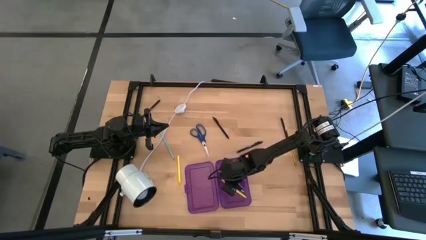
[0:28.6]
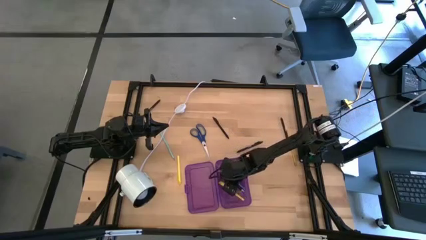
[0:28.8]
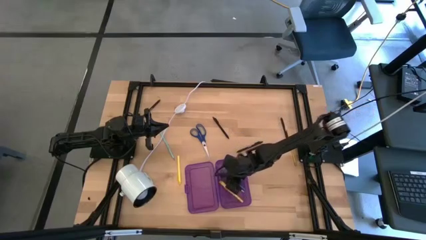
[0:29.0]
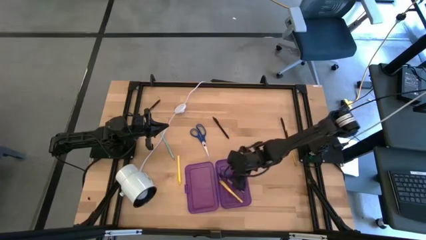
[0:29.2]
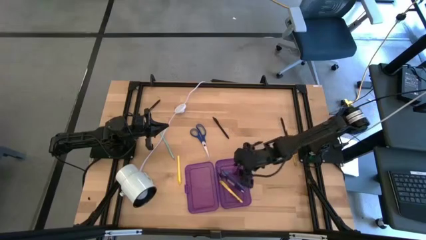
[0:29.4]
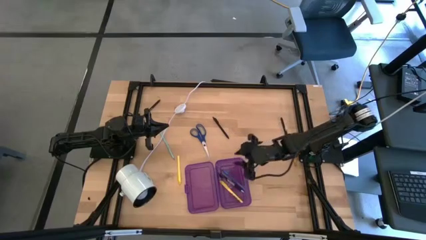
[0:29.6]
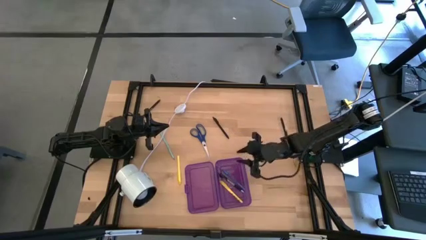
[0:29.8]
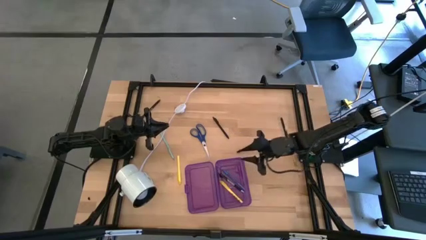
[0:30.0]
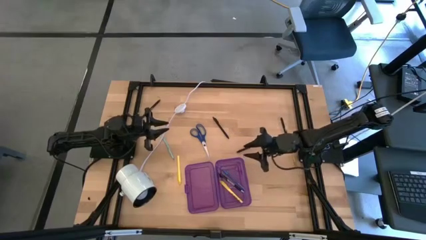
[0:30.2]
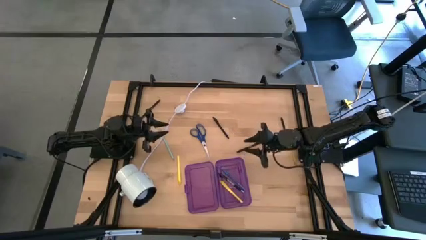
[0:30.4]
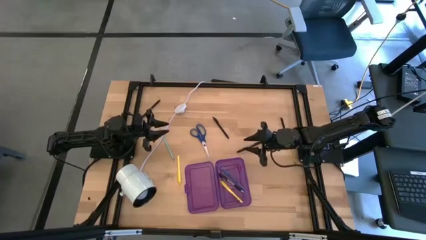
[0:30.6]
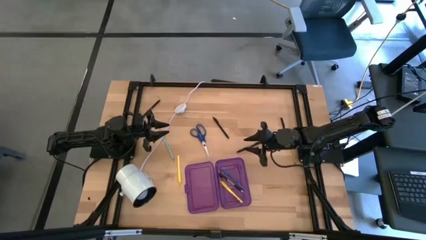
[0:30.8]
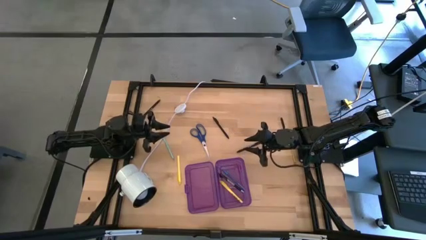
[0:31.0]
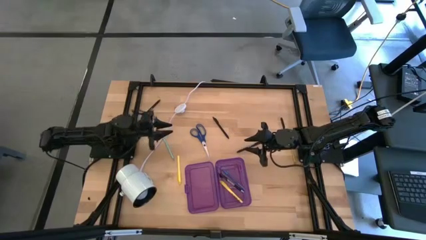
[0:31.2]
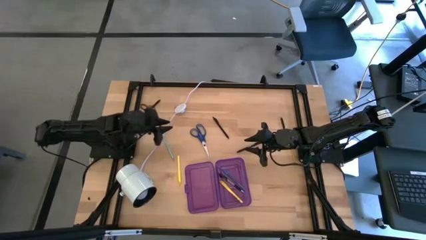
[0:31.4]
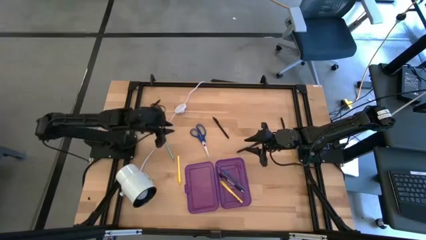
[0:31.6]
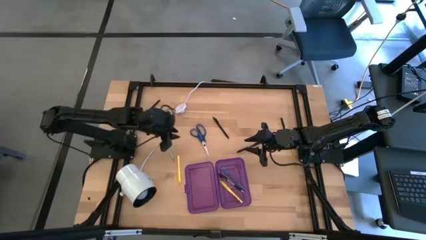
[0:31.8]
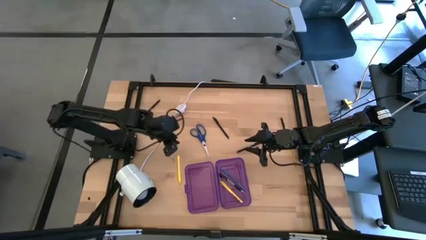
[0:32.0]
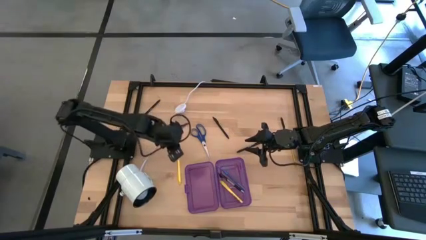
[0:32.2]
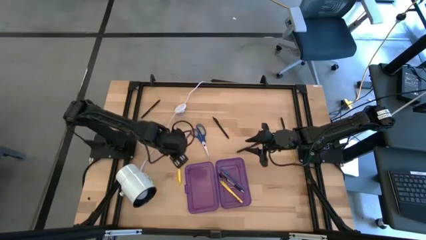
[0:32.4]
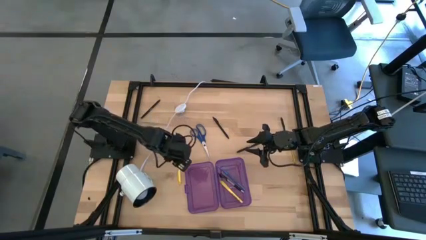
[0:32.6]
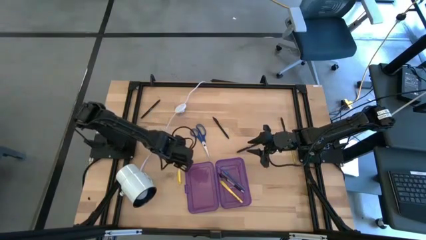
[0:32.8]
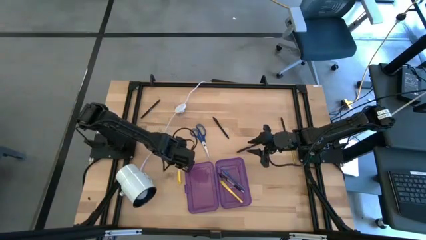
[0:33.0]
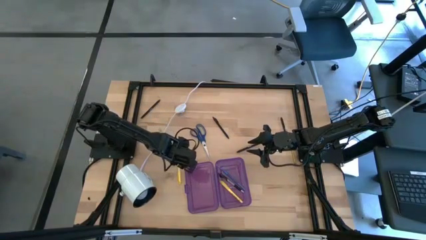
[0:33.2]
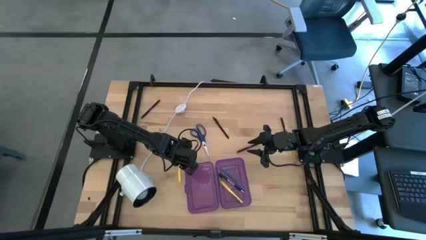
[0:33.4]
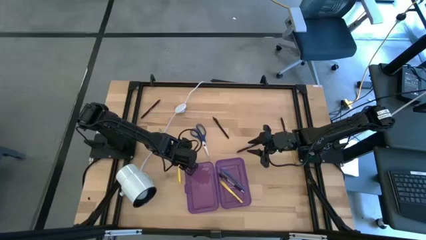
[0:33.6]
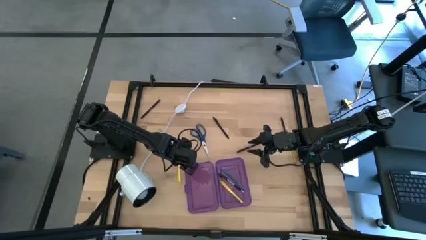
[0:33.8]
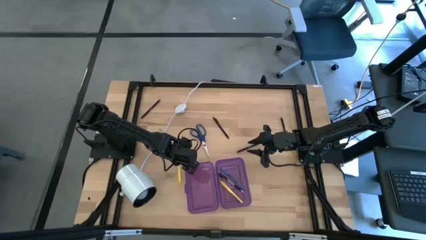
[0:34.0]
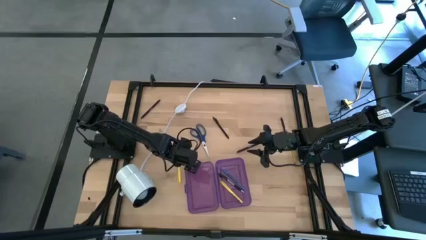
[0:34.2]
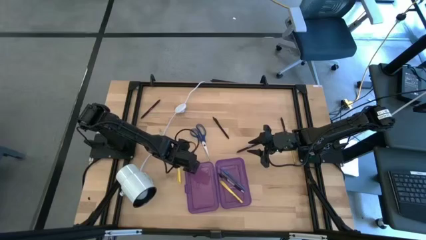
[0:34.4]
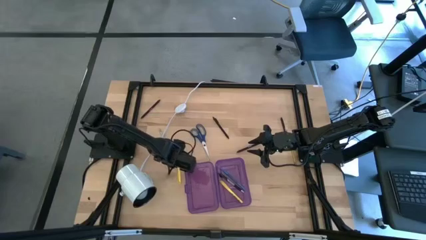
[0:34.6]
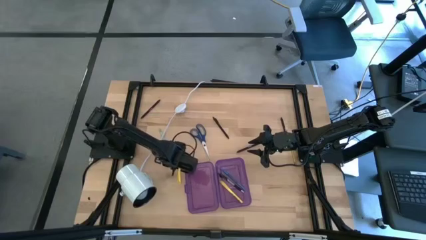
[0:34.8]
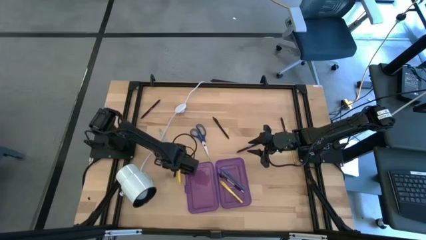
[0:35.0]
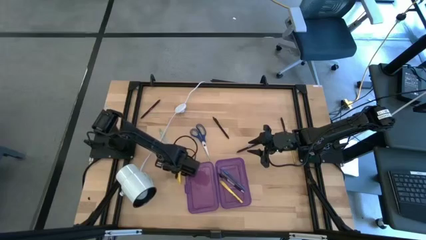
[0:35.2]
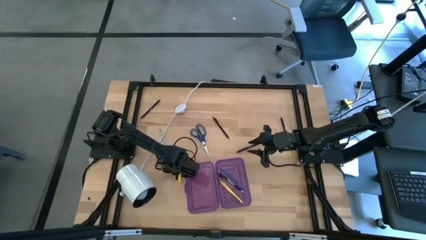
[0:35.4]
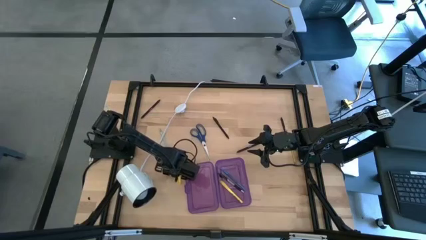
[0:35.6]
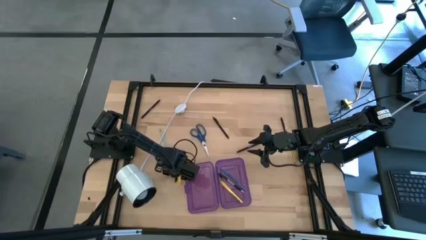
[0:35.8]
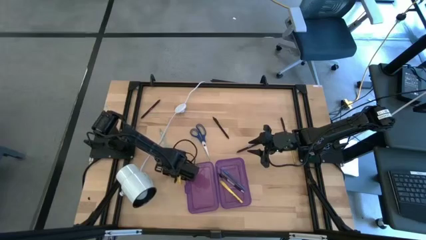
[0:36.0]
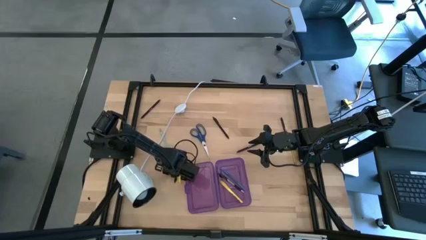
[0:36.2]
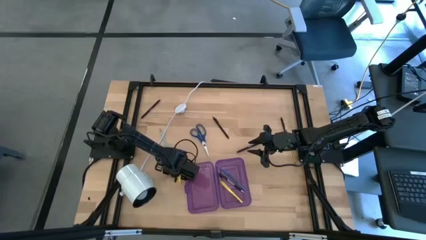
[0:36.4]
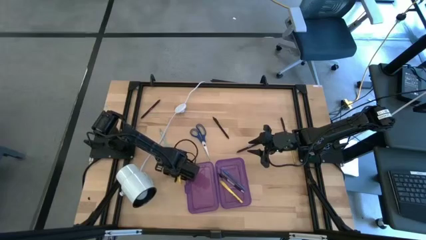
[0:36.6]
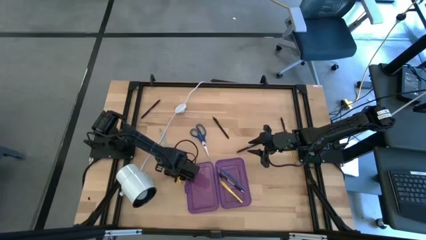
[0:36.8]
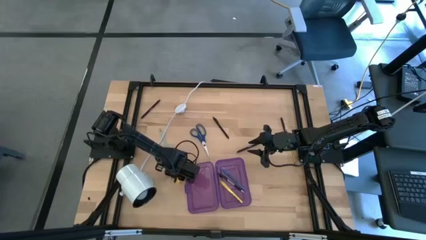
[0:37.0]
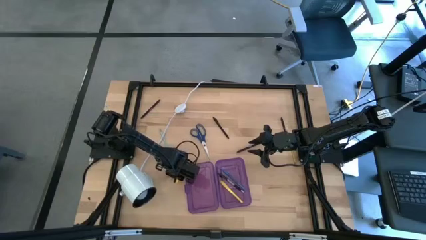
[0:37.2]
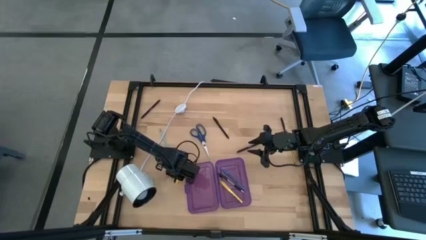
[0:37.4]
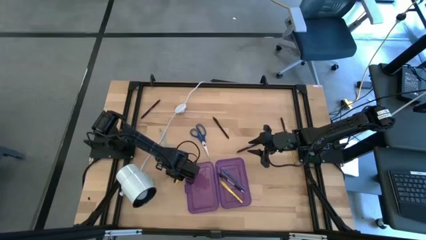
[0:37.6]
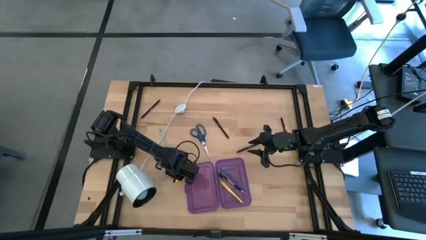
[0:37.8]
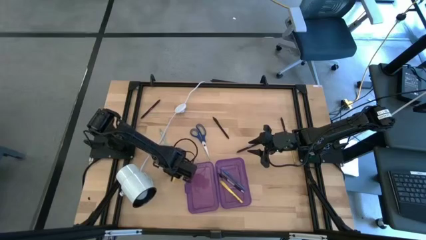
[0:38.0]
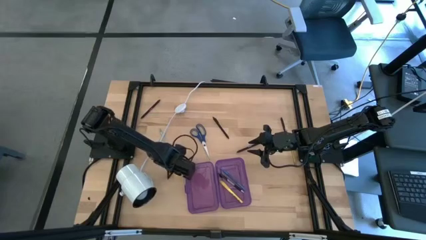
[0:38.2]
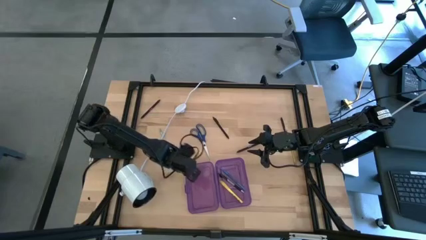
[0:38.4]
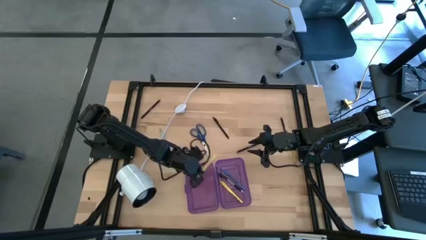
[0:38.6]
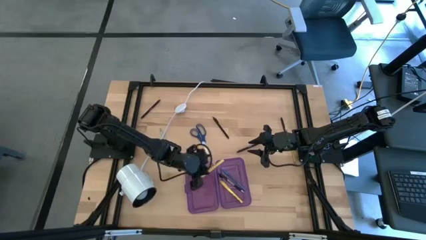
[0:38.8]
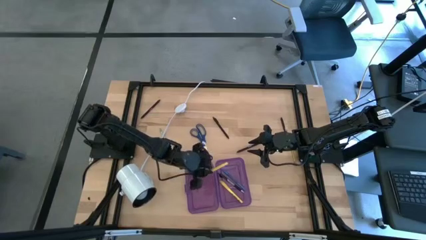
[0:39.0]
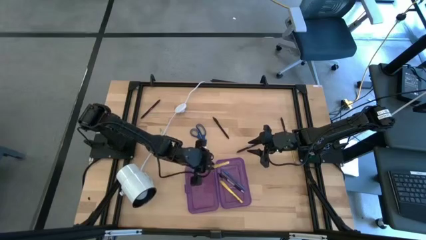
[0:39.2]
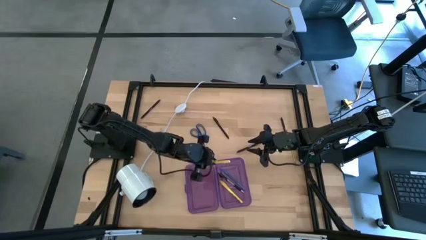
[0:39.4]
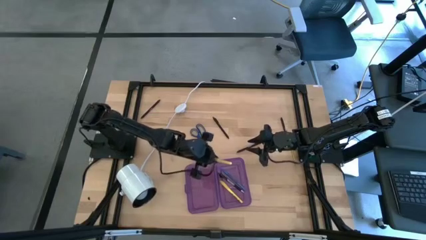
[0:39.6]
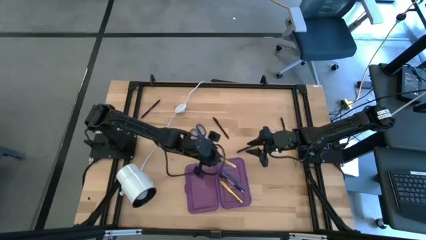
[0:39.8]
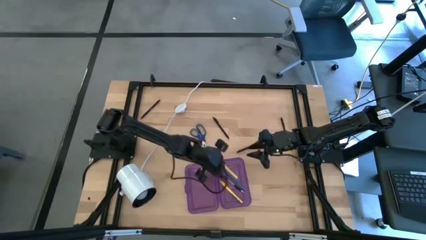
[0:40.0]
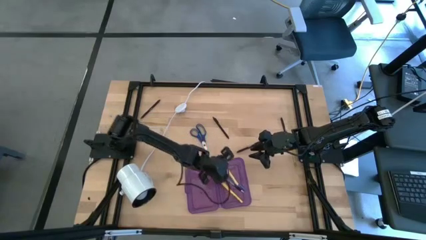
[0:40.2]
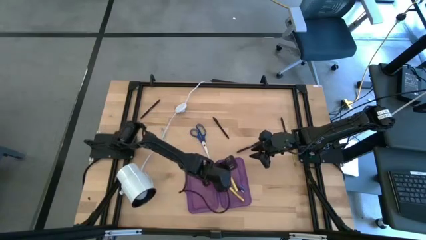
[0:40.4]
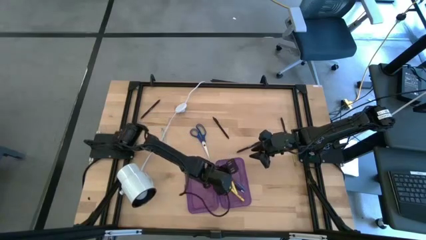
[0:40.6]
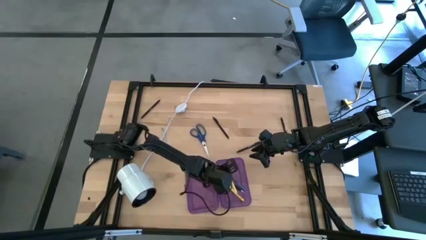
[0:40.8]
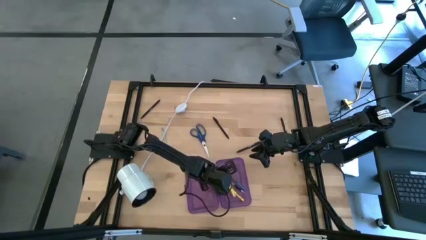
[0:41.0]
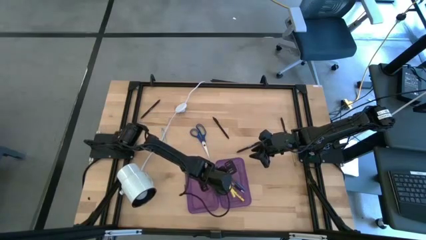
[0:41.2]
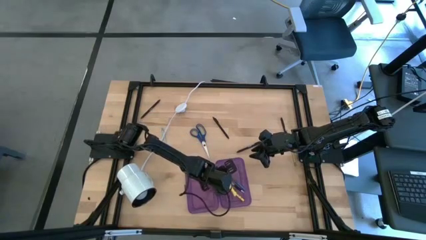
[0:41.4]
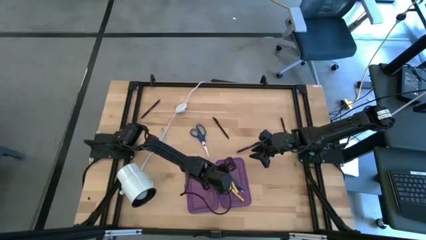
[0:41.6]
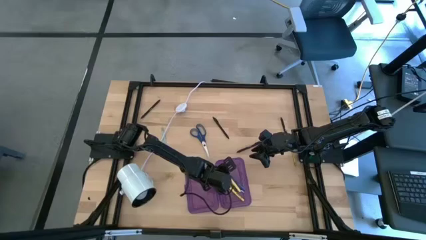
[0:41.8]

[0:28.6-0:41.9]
Task: Pick & place school supplies into a supply box
Put the yellow pen into the purple supply box

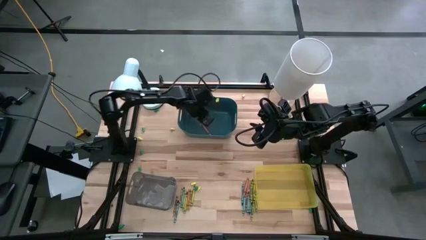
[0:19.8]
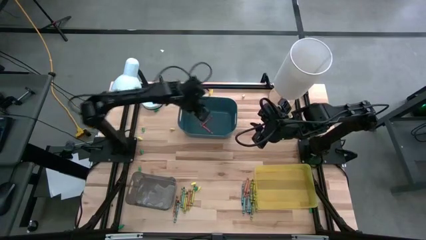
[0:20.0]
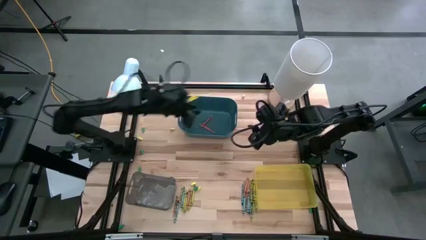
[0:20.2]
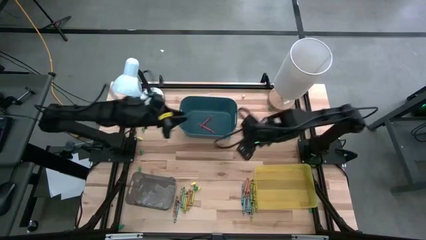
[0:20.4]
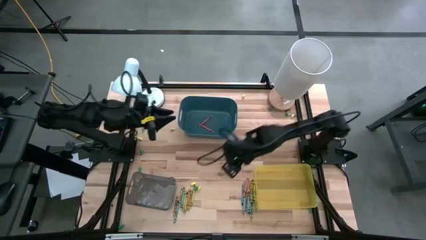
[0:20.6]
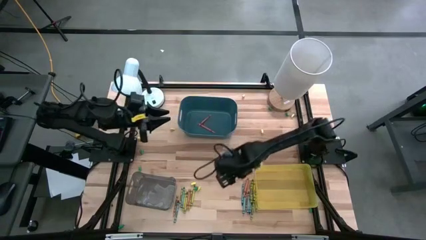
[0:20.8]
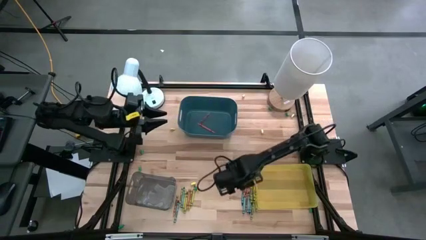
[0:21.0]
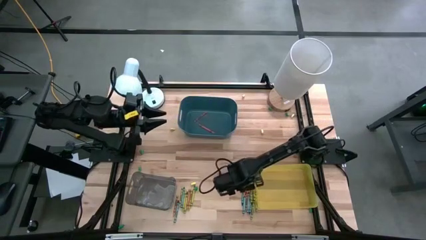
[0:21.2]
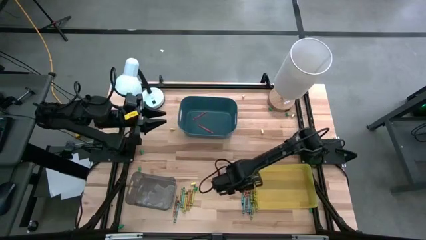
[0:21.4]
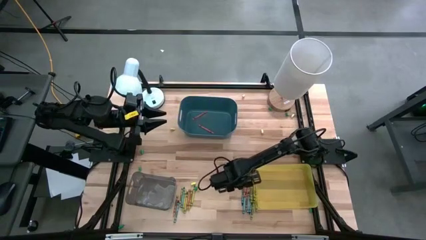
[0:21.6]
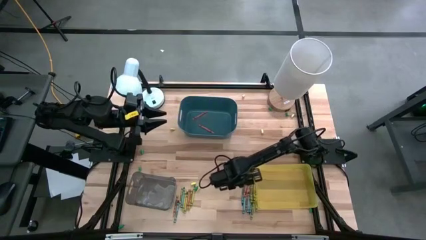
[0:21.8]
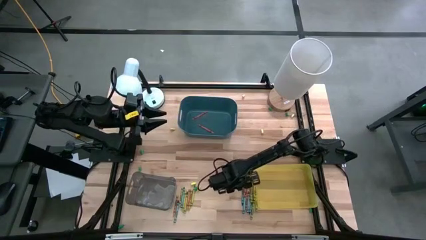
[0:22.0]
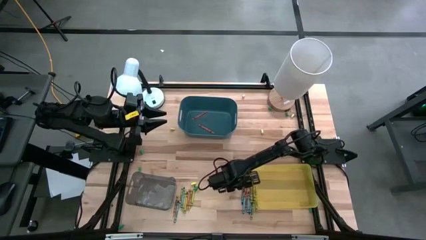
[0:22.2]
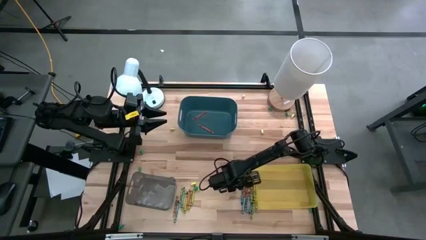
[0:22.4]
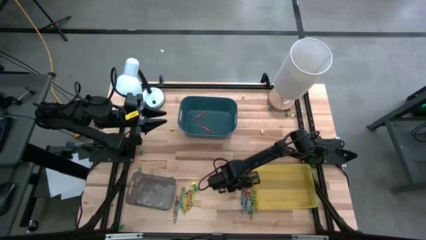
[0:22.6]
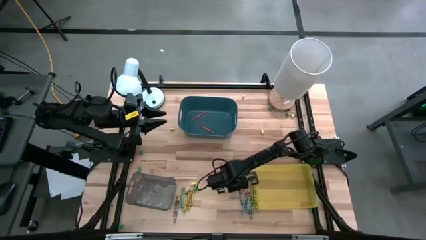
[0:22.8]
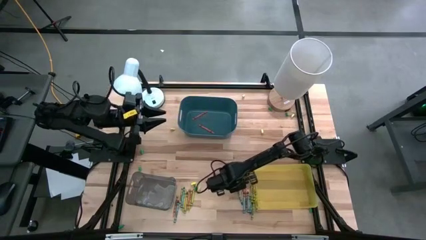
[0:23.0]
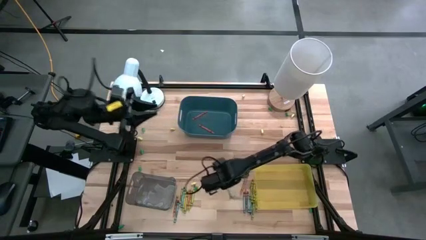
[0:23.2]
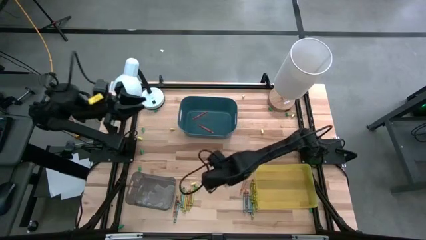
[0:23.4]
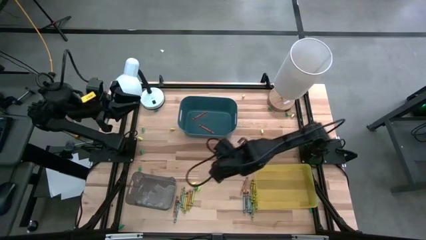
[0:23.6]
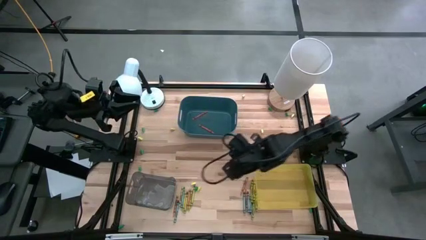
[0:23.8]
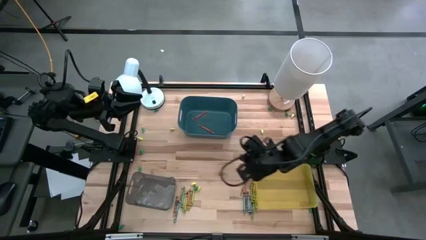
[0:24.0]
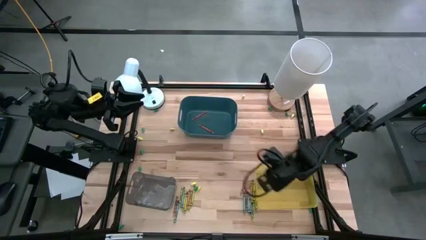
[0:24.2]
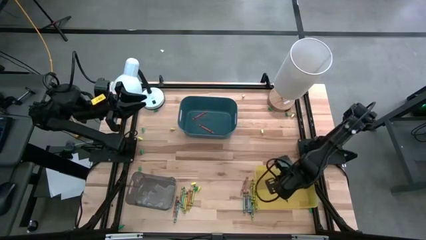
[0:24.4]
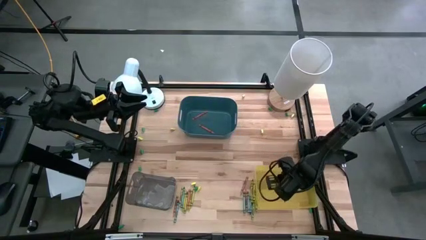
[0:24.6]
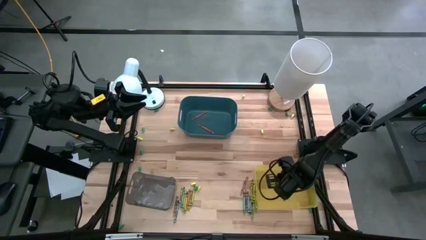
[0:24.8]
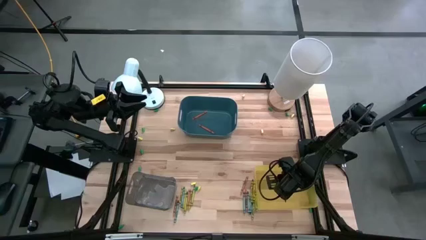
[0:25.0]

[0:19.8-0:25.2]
Task: Sort crayons
Put the blue crayon into the yellow bin
